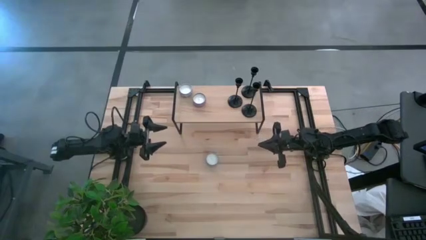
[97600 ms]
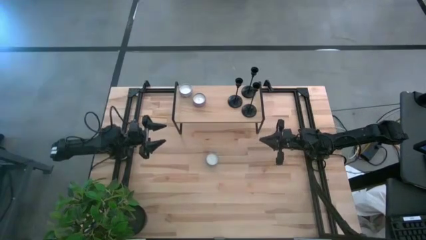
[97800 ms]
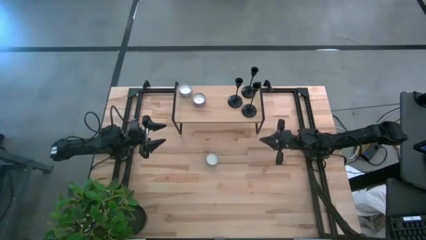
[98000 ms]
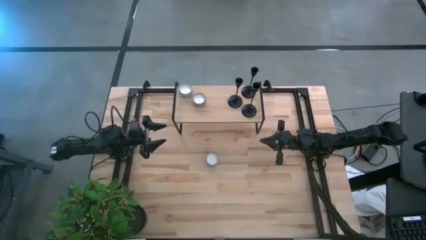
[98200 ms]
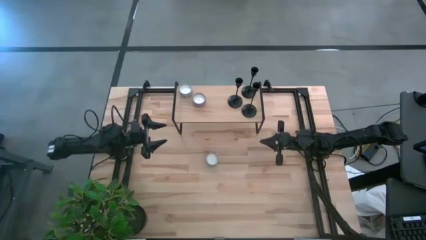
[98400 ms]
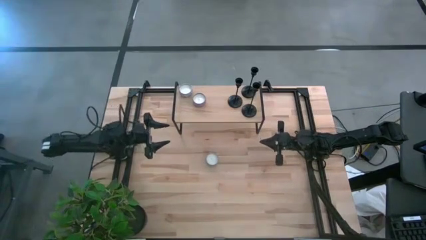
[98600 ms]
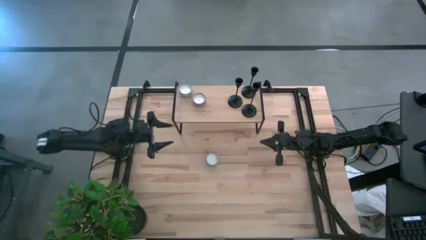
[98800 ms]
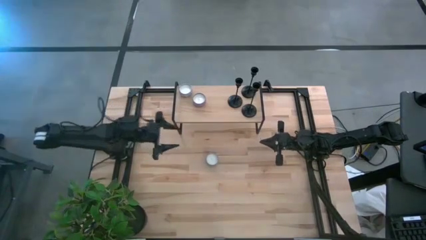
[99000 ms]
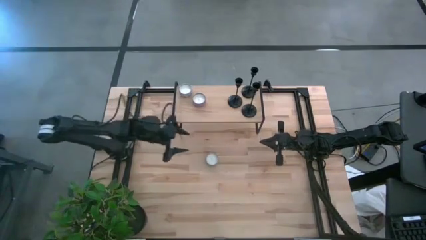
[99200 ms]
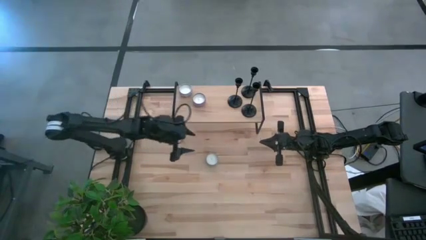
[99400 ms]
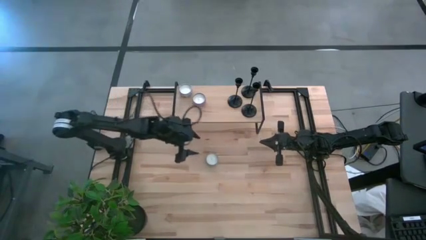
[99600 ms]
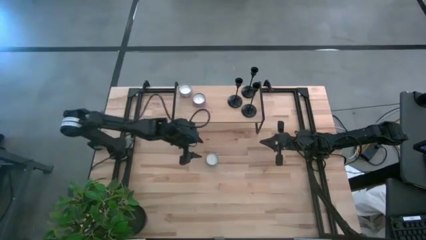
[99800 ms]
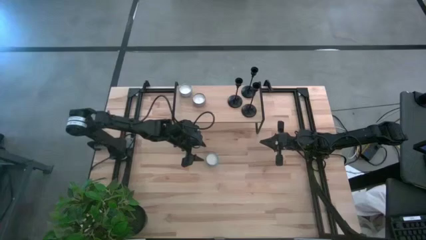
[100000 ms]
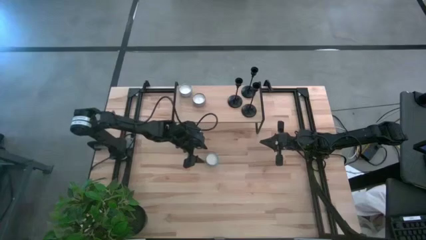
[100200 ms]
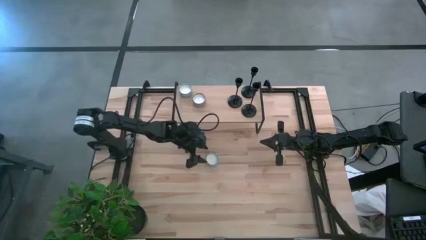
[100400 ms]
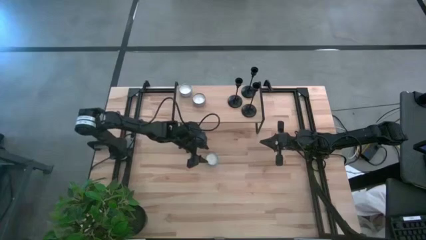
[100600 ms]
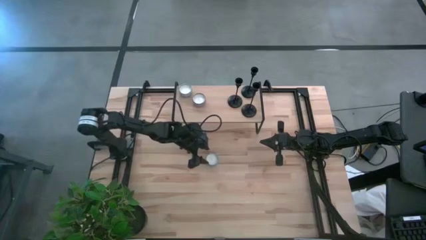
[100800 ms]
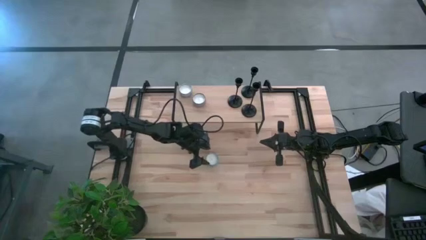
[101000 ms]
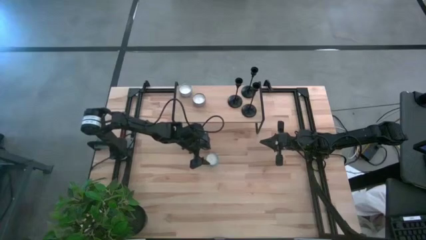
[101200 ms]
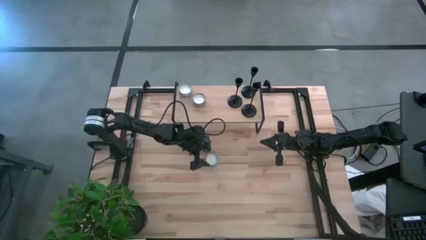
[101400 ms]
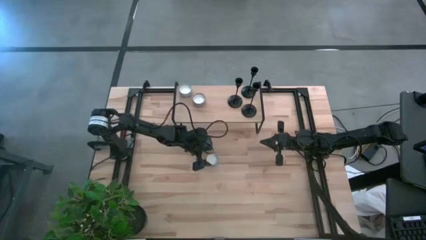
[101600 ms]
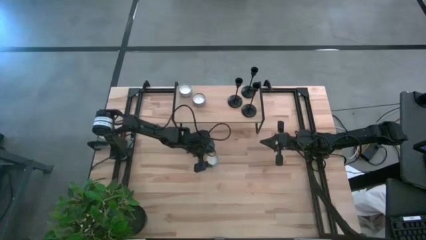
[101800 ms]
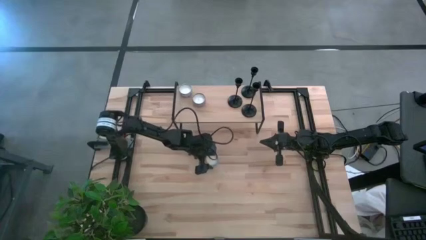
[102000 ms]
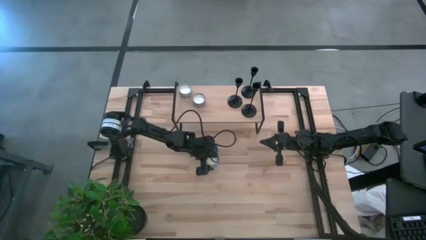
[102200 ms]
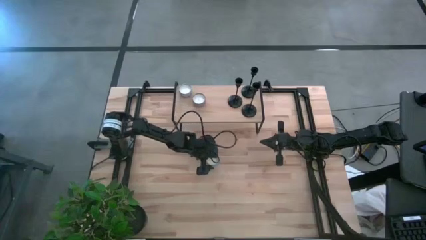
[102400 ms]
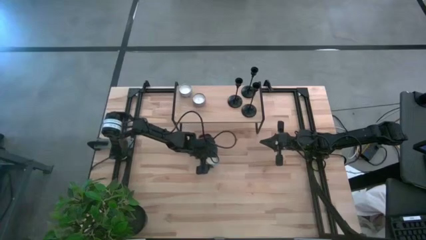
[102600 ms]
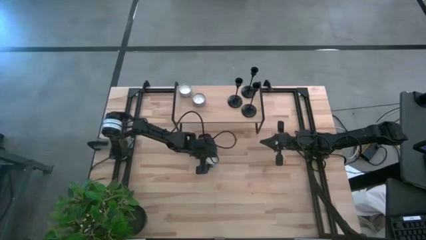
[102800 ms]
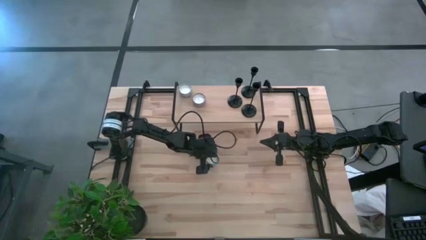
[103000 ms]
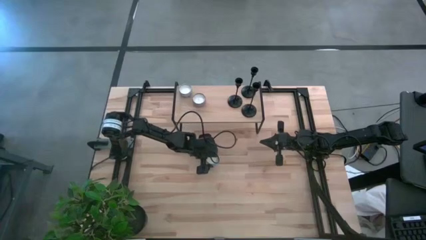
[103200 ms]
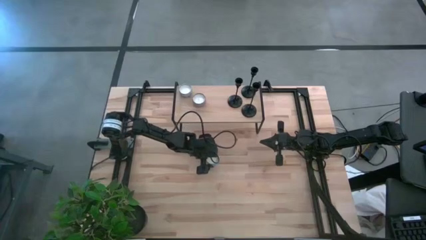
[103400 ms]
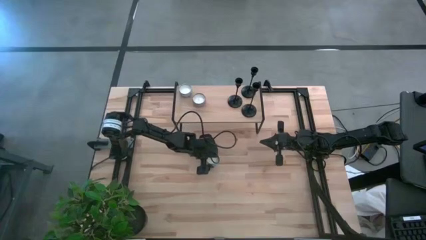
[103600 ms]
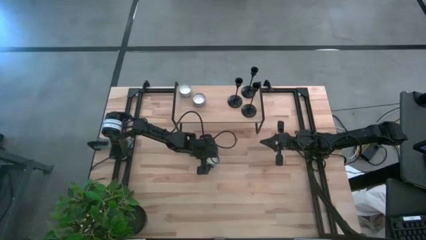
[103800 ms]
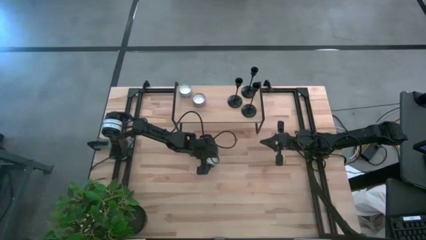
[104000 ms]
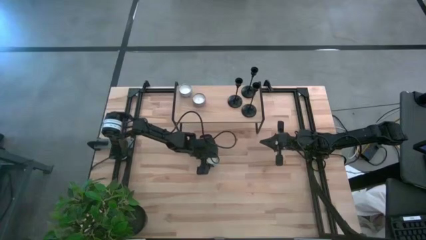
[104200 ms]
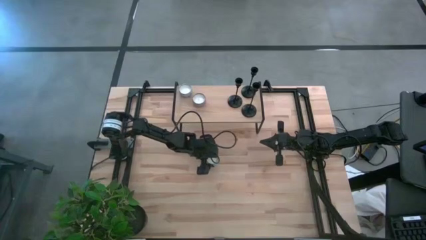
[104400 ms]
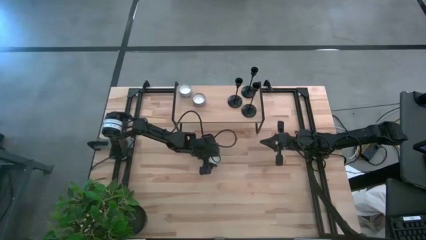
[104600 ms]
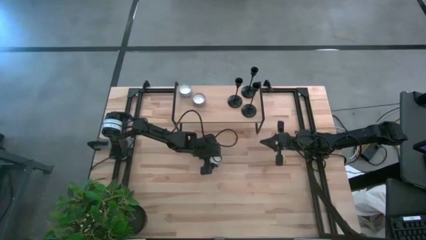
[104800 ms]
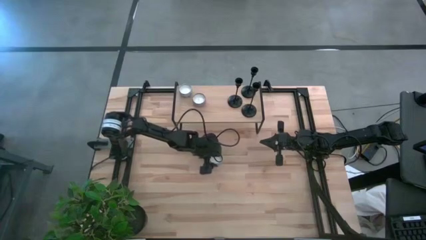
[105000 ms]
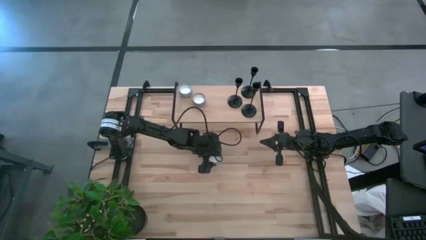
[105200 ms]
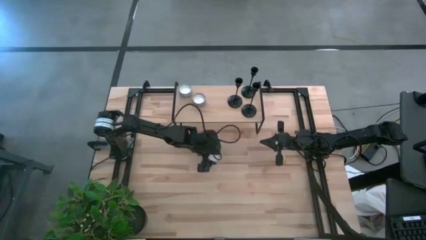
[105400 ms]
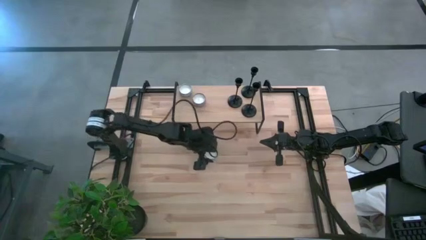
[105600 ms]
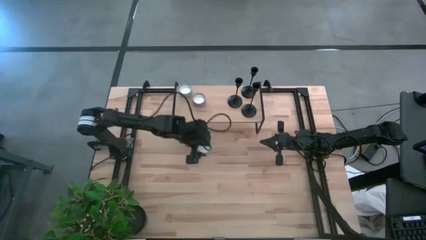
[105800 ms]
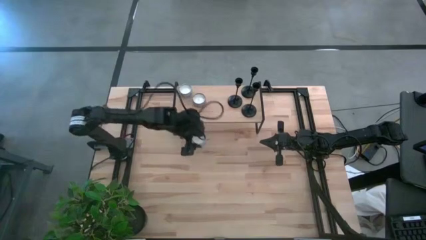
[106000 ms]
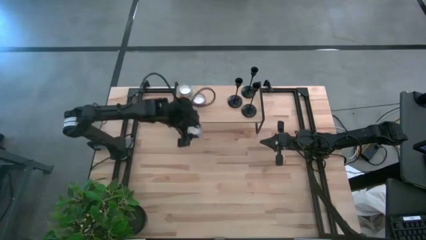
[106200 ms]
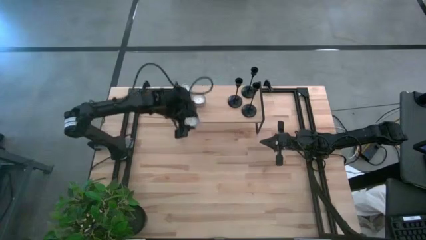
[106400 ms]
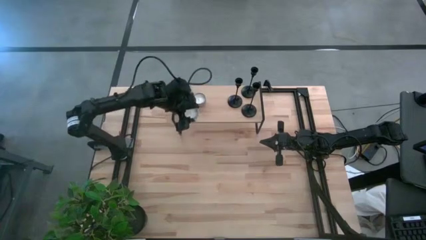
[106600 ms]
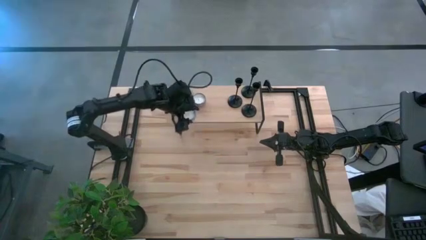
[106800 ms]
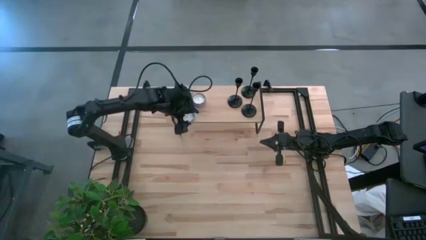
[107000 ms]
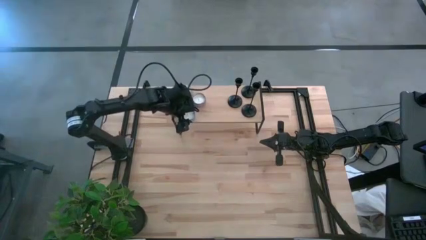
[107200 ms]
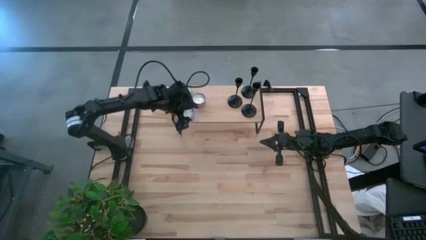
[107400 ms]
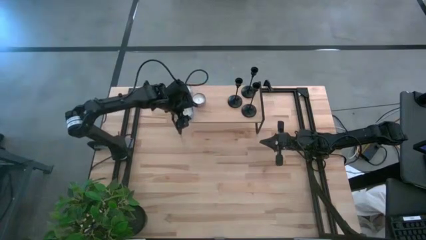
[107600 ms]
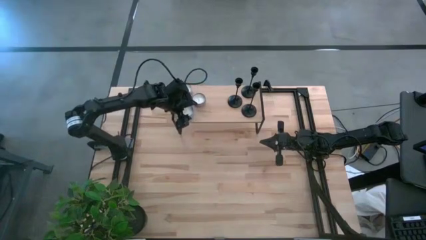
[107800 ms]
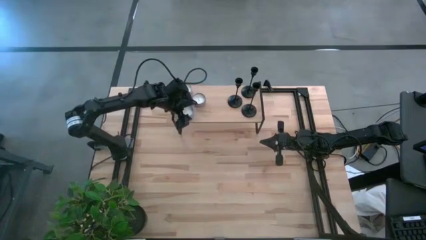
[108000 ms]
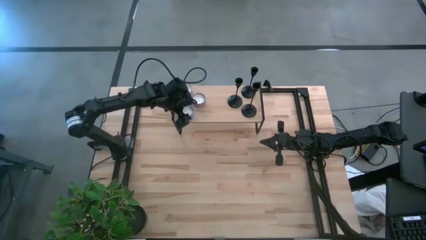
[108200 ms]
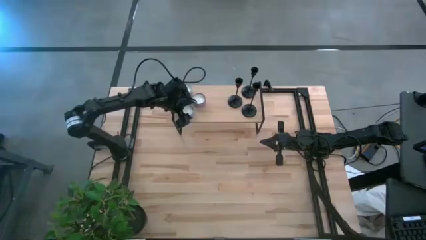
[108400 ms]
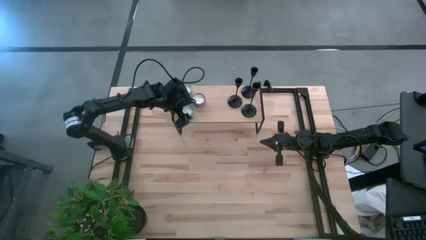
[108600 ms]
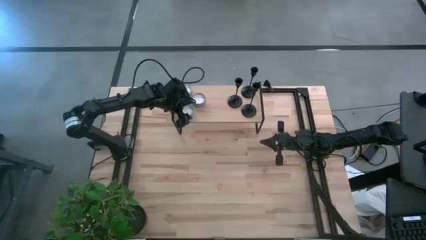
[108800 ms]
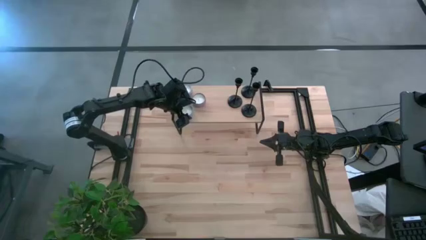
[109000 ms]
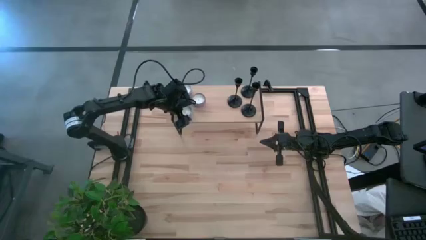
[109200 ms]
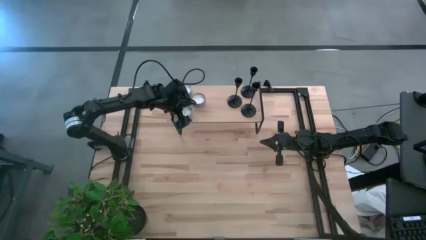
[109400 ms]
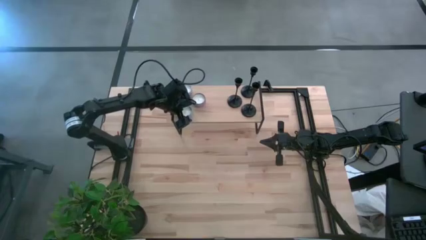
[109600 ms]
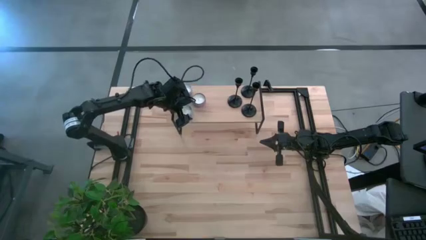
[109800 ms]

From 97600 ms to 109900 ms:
Task: Pick & Place candle stick holders
Put the blue scented candle on the shelf

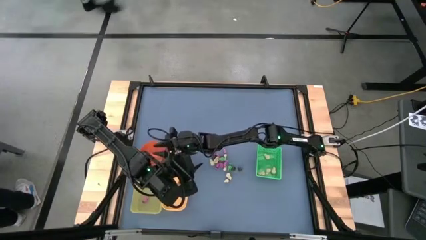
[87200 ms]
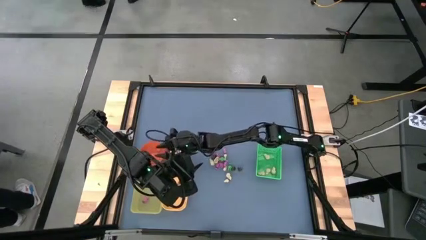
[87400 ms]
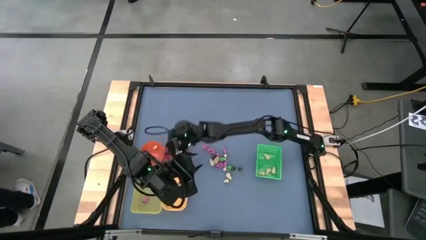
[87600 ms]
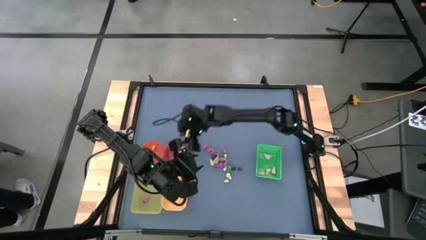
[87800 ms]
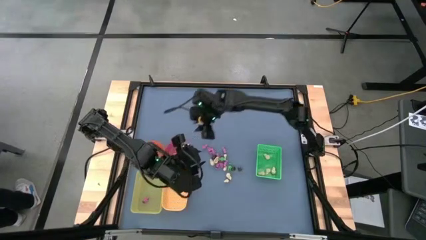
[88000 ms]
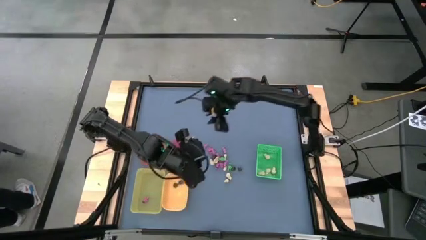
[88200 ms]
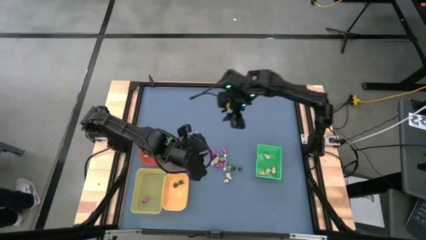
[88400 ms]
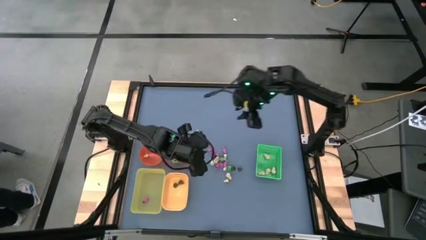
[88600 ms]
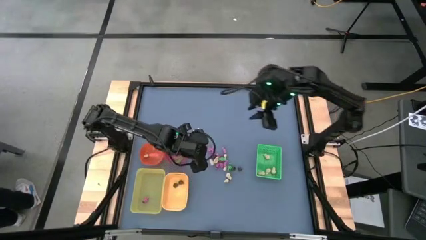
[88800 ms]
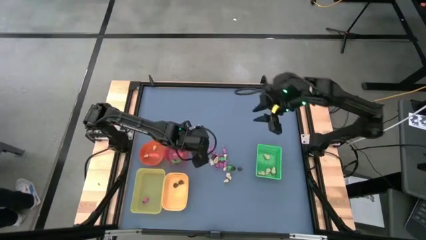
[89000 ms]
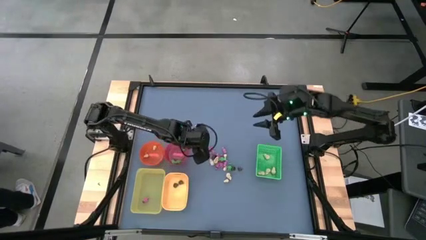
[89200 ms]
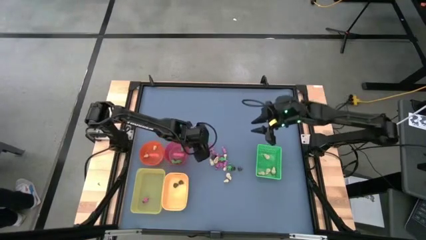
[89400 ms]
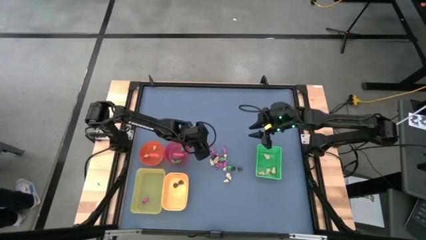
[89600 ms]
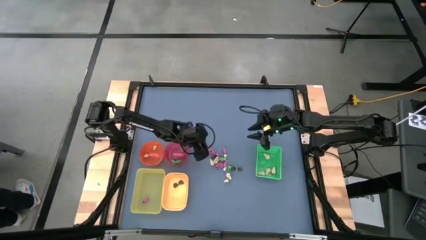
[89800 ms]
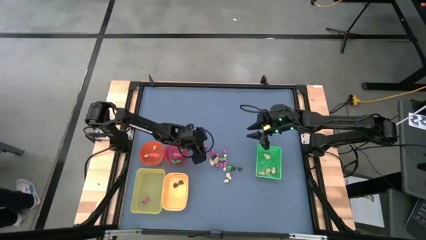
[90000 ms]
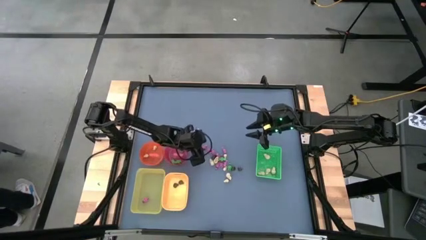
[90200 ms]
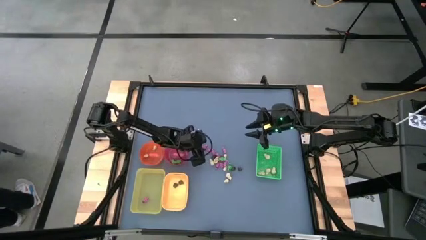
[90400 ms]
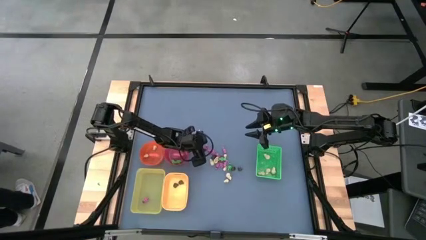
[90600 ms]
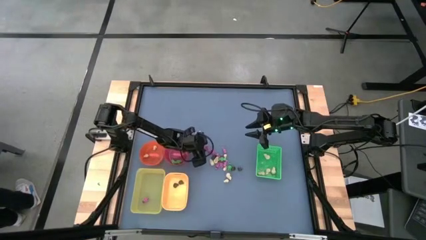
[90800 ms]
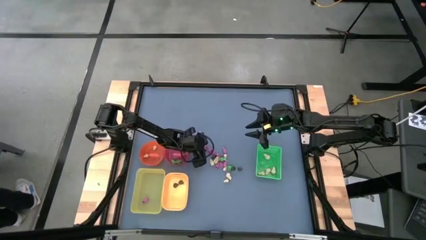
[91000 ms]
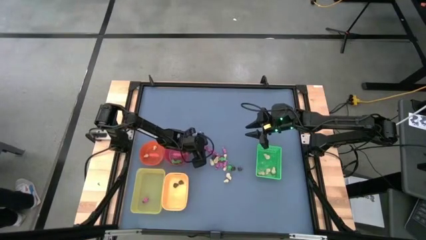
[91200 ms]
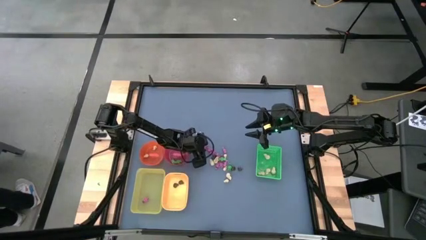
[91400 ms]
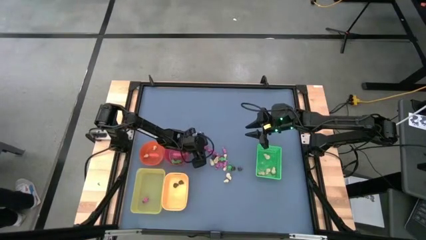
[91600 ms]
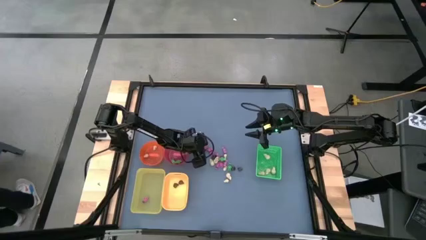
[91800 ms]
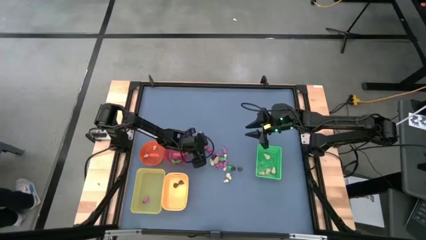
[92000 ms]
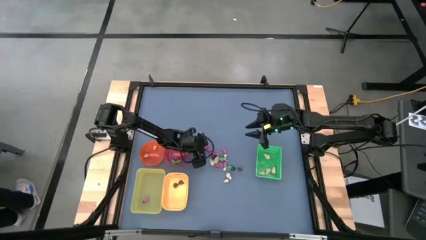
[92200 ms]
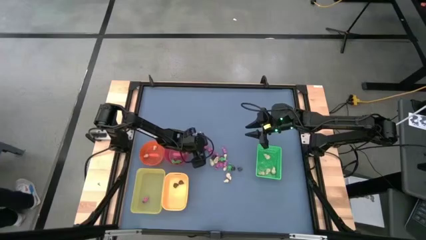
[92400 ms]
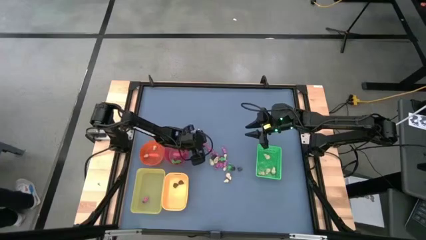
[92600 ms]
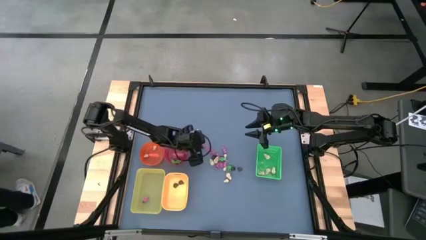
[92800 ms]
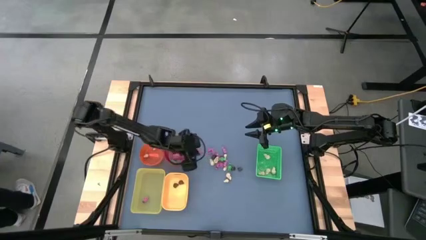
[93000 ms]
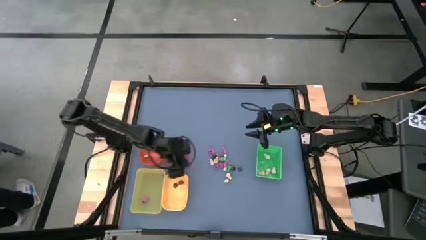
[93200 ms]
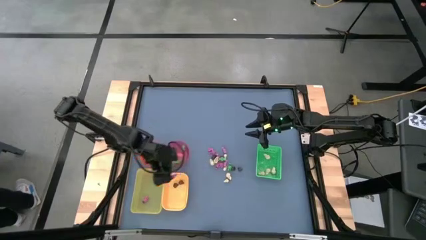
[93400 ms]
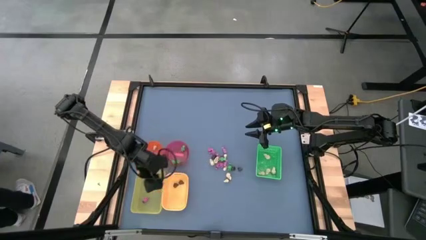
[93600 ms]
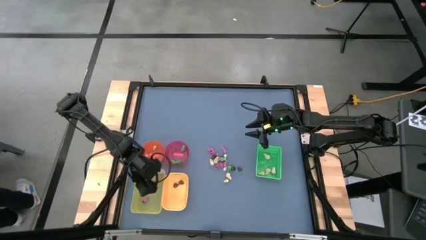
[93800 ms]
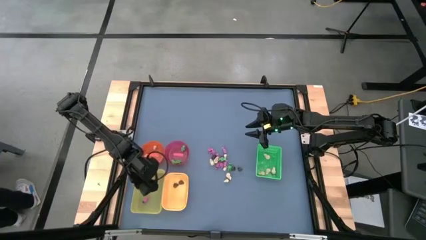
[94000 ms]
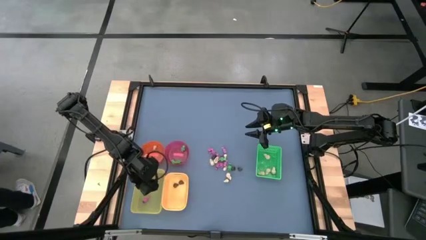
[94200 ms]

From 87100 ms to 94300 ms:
Task: Sort Halloween decoration
Put the pink skeleton toy into the light yellow bin
